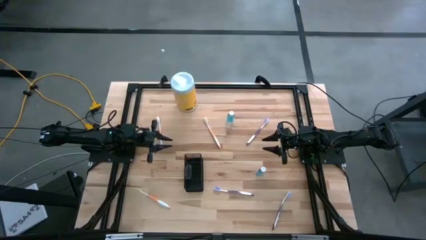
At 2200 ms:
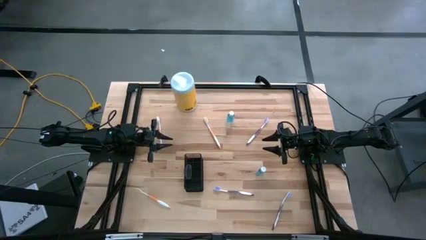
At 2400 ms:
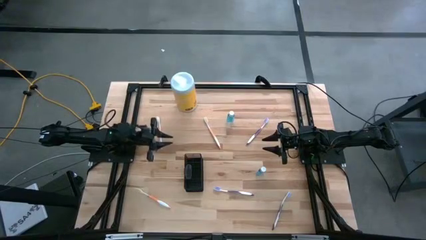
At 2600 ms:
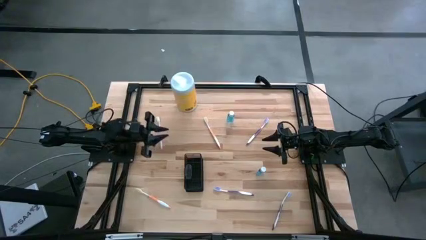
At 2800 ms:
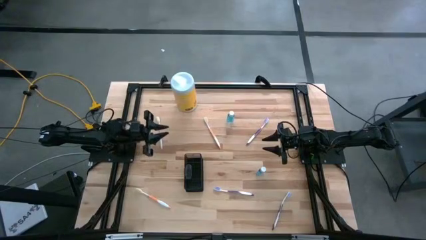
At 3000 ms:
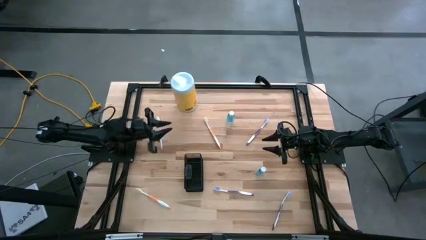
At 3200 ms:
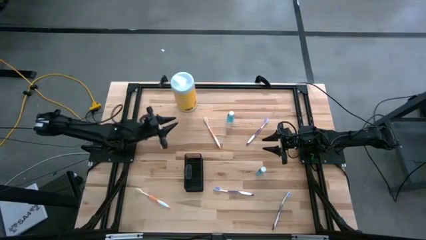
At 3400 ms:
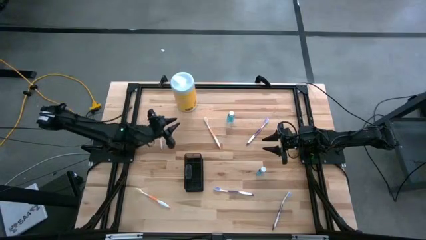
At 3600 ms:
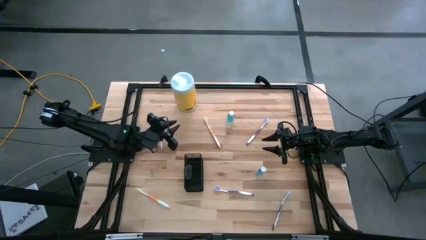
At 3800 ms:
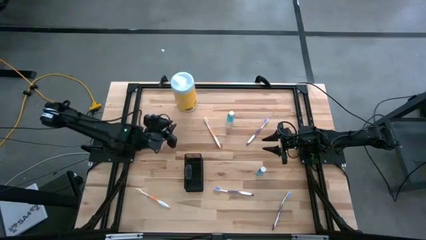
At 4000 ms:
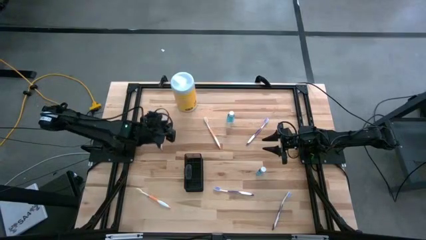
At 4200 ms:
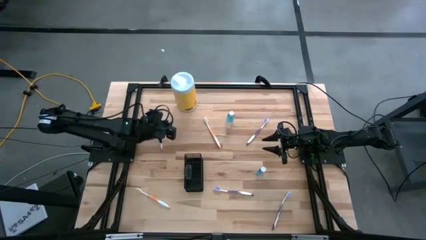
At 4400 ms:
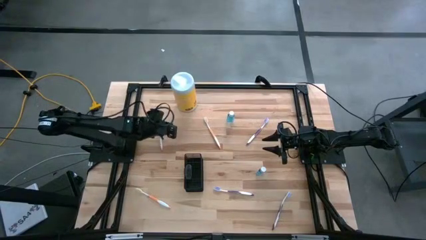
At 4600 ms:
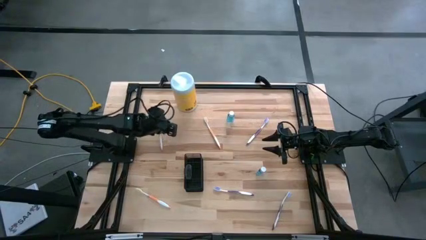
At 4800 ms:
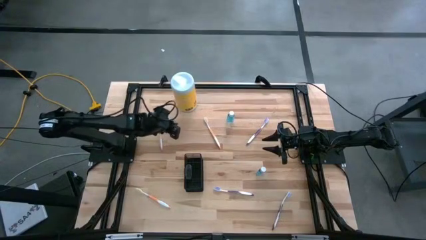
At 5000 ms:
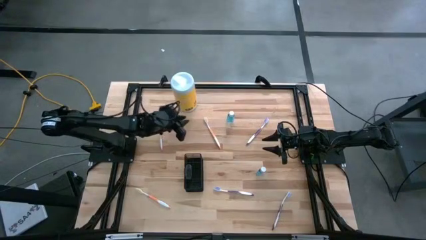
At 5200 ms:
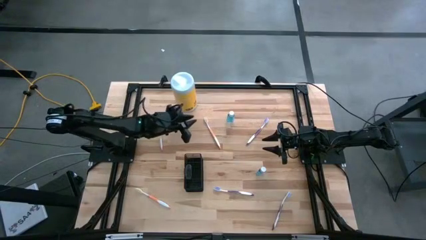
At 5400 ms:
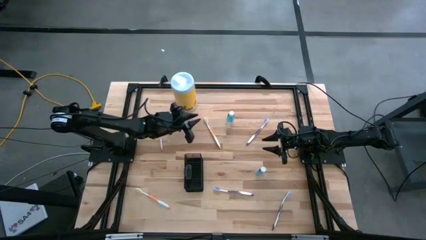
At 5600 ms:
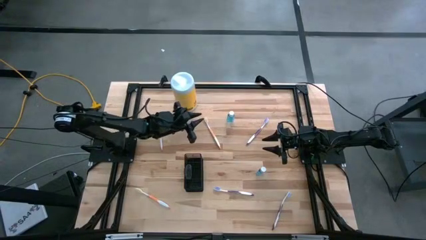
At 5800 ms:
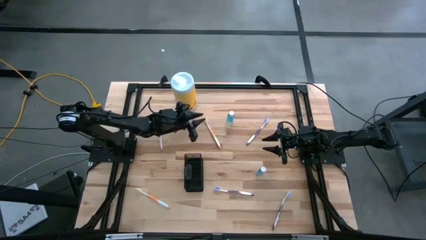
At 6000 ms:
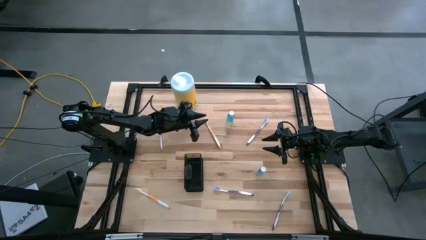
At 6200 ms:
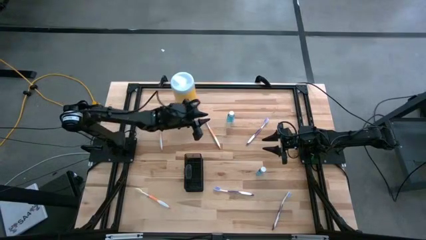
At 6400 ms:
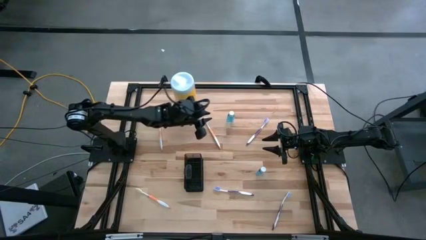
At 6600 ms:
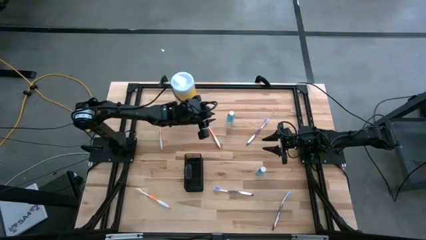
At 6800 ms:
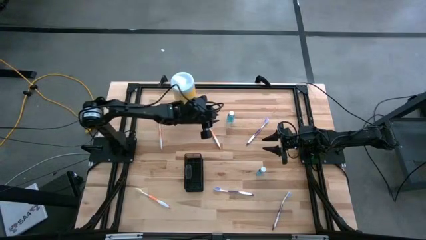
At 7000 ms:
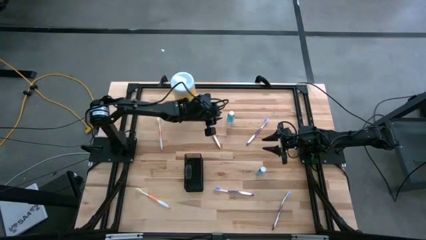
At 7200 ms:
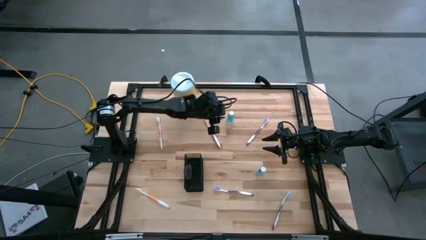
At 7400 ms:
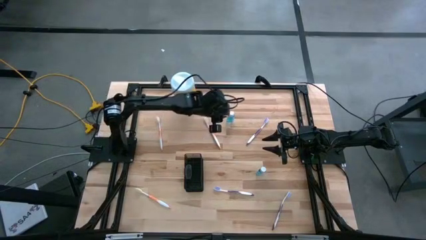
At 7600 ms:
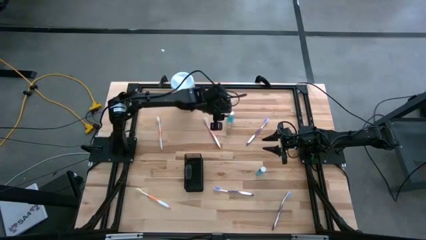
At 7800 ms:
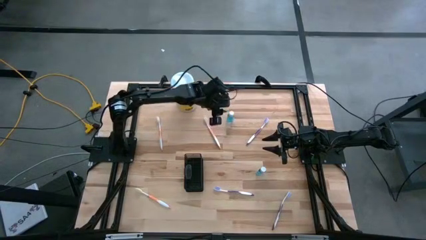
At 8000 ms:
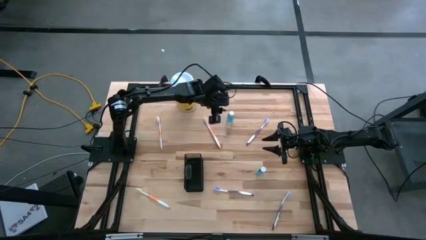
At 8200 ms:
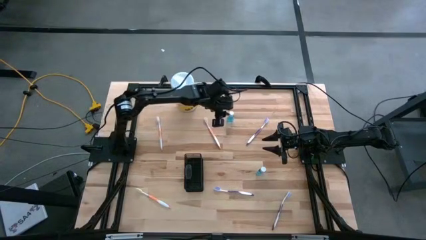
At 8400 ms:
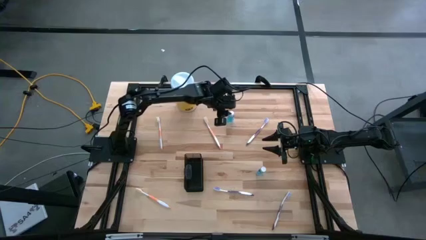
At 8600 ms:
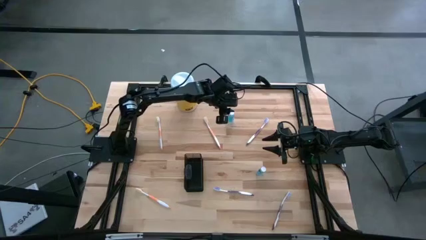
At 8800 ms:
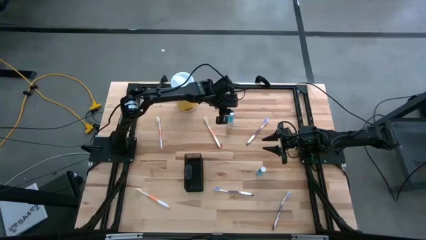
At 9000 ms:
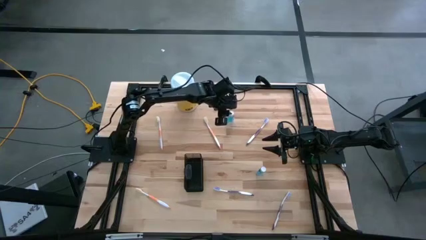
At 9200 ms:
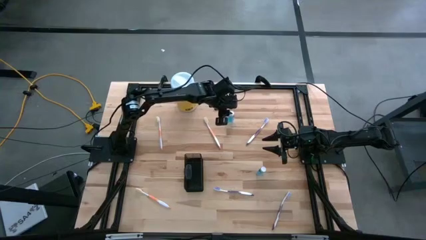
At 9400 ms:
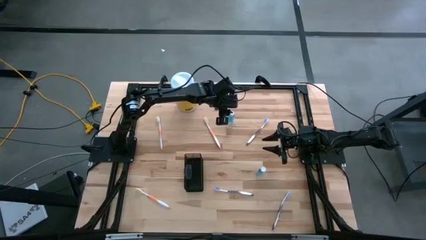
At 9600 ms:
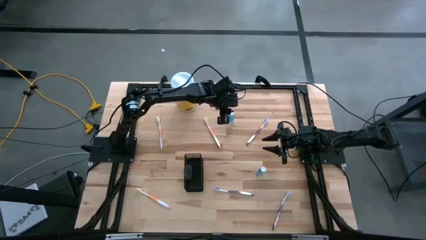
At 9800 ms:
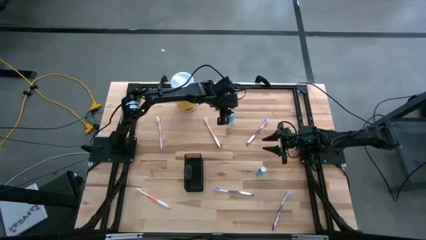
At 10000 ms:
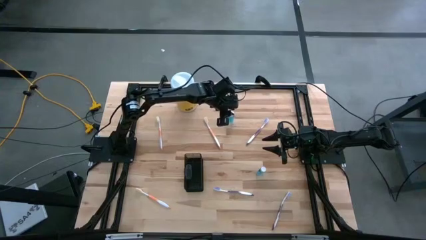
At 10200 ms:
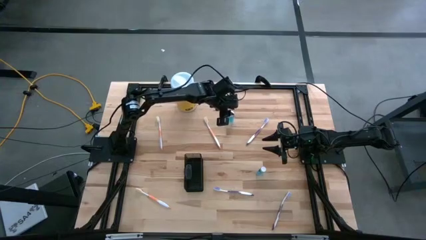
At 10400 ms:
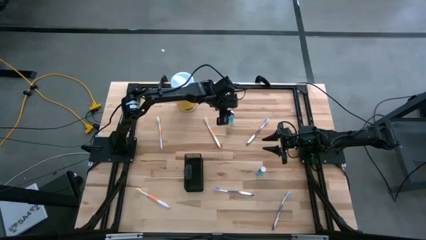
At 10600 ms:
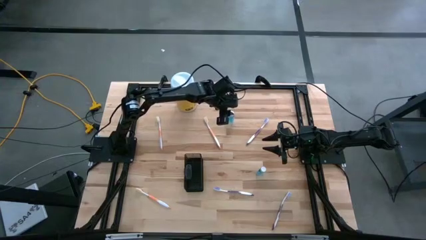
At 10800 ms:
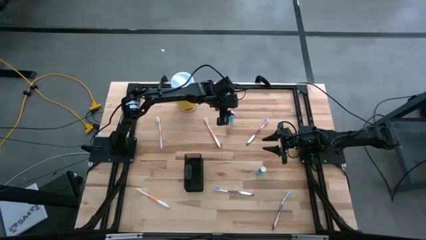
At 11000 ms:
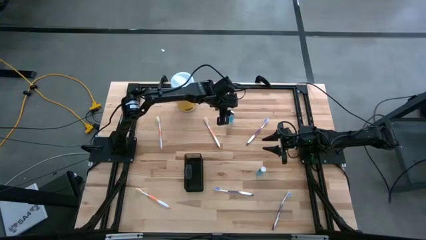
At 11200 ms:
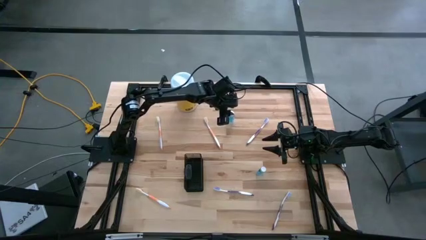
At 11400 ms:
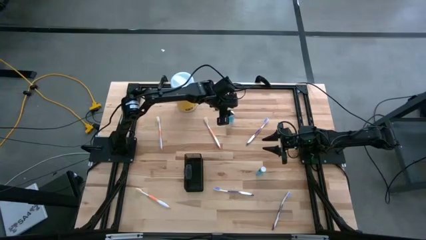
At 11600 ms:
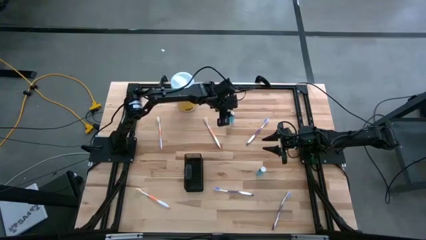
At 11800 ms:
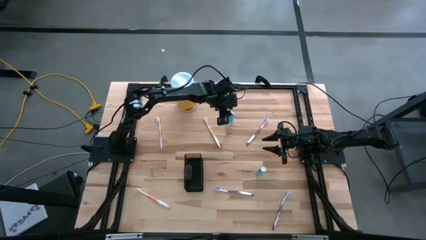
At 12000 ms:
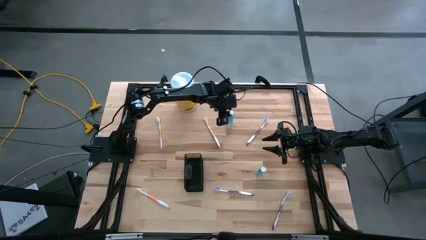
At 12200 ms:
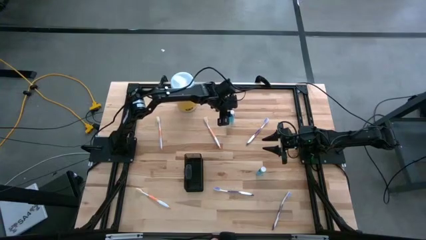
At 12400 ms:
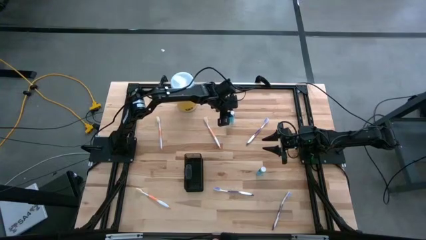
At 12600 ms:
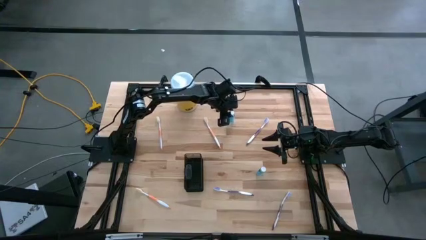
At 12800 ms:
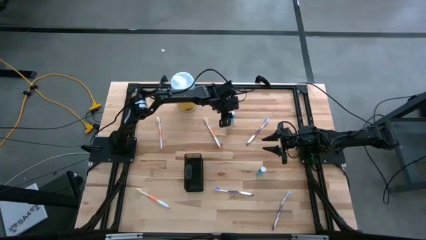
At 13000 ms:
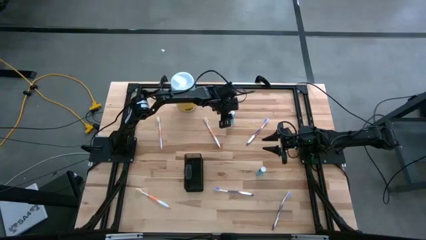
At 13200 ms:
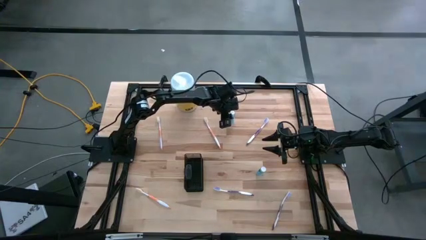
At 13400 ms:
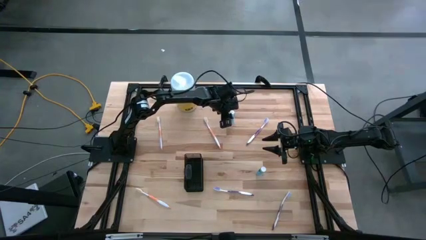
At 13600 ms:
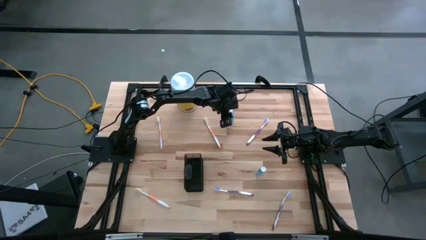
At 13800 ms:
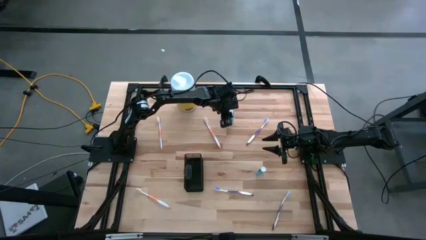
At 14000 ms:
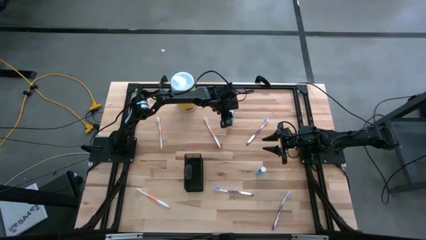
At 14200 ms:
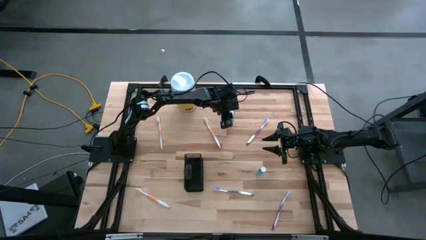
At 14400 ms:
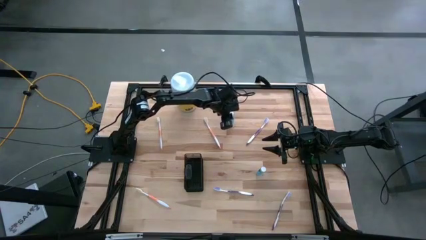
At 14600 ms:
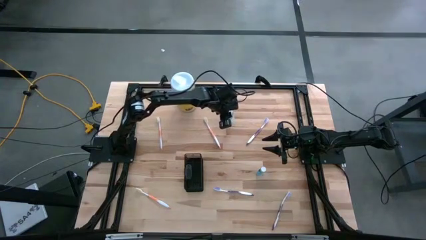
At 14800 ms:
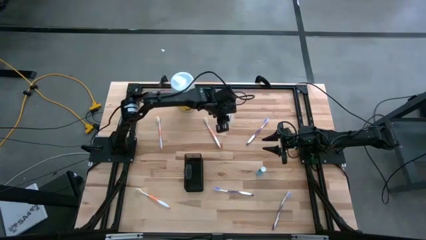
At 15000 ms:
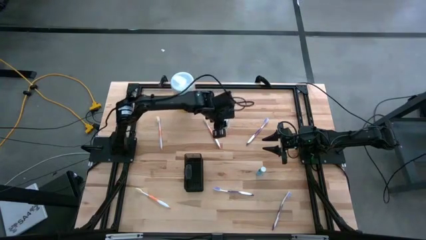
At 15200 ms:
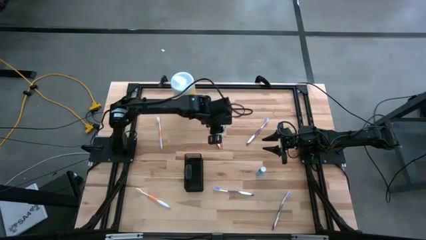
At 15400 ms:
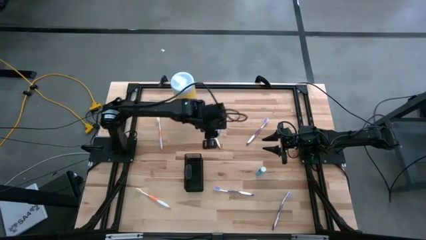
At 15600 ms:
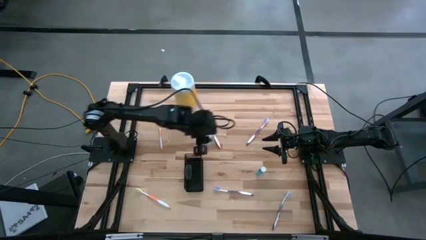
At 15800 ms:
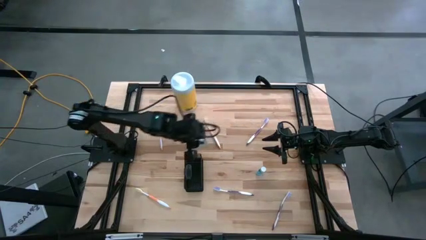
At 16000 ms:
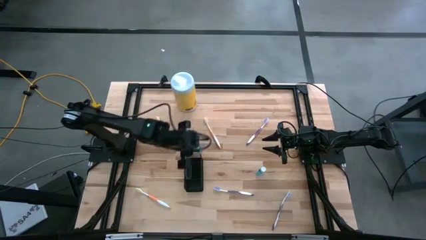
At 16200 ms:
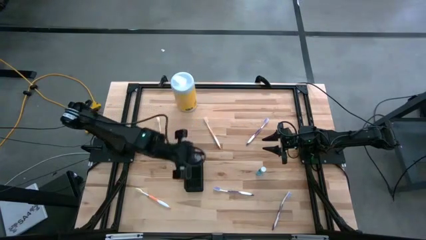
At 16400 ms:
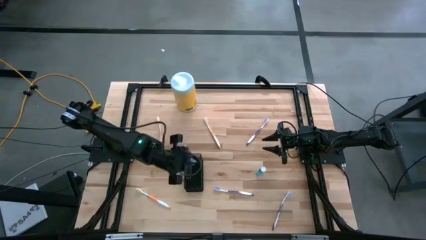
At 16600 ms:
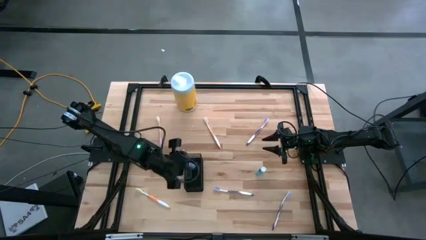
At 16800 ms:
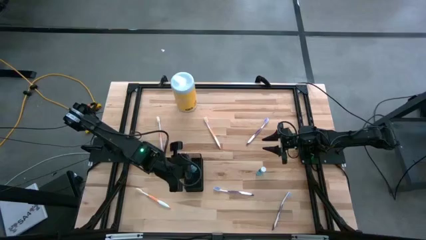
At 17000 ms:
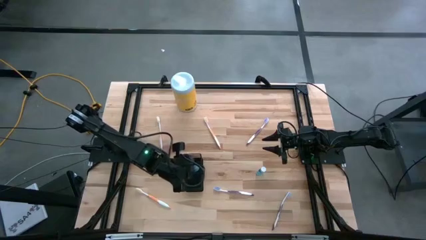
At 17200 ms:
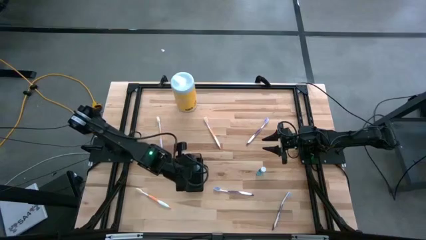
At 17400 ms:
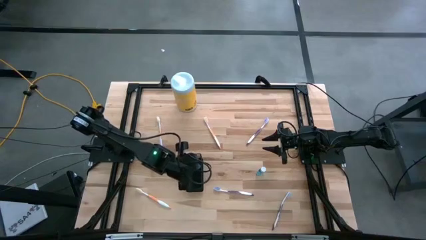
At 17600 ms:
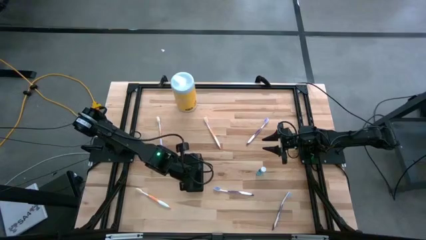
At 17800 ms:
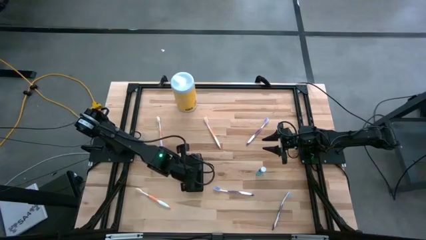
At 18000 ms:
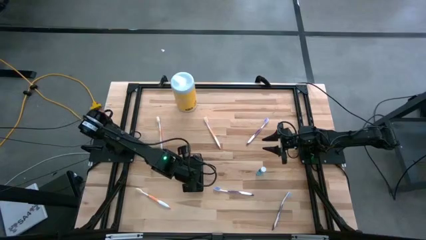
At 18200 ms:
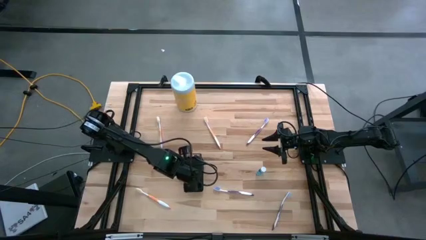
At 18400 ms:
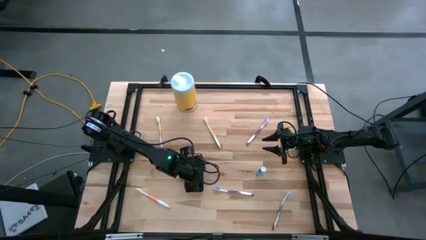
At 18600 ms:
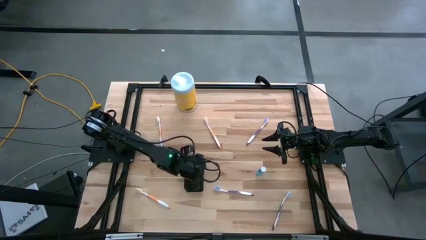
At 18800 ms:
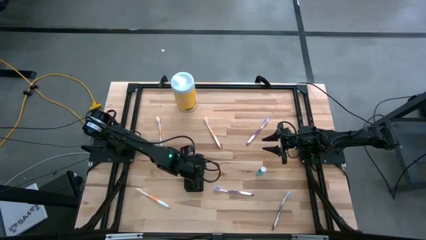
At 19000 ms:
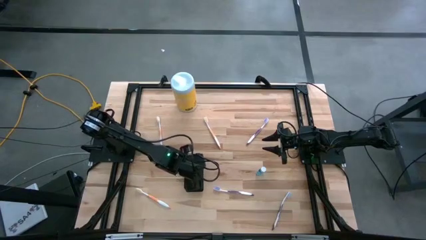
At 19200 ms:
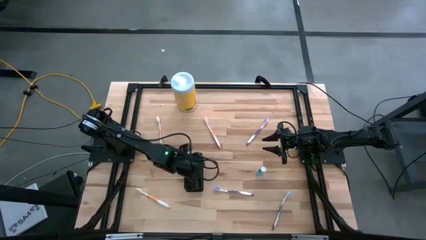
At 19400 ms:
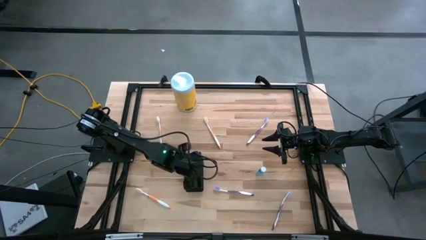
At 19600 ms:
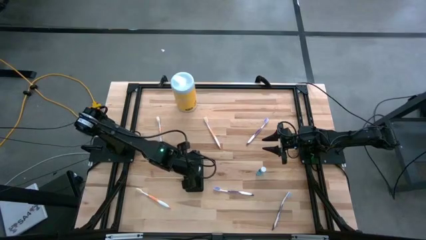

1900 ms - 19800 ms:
Task: Pick & Place toothbrushing station
Put the top blue mouthwash into the middle section of the black wire organizer
